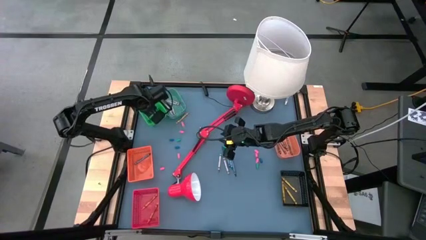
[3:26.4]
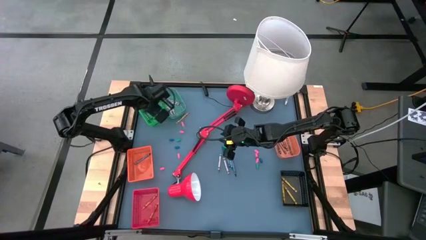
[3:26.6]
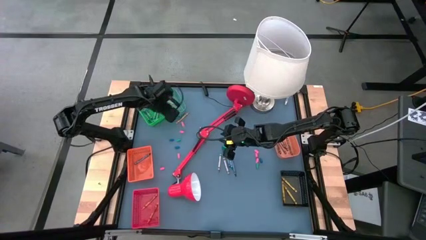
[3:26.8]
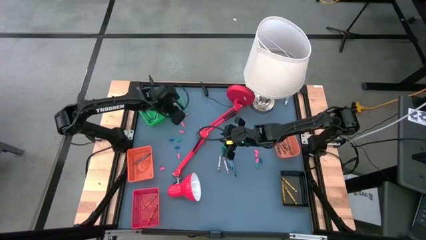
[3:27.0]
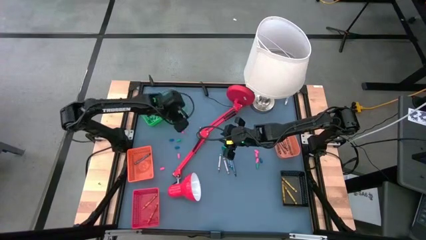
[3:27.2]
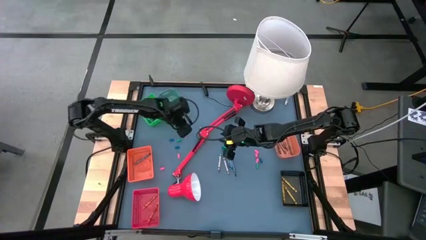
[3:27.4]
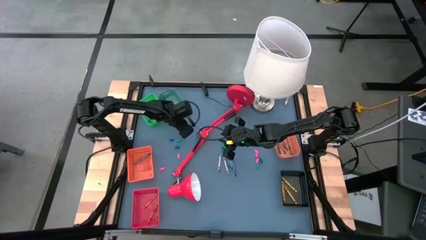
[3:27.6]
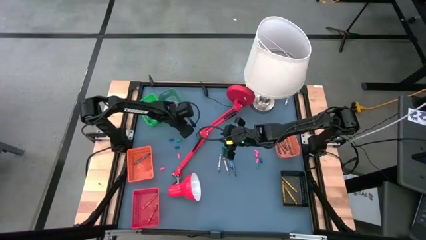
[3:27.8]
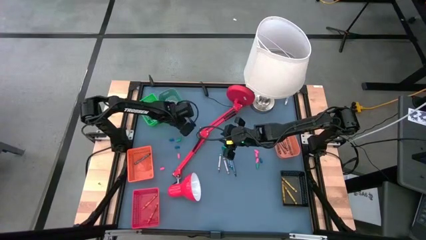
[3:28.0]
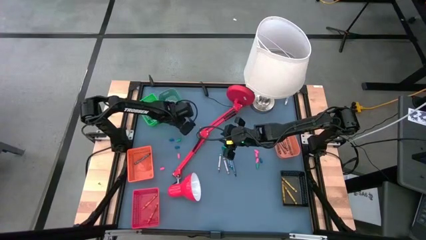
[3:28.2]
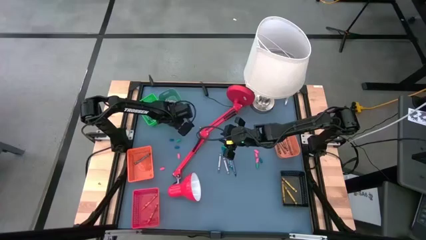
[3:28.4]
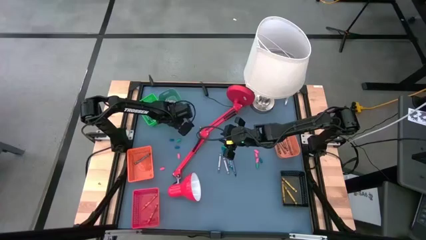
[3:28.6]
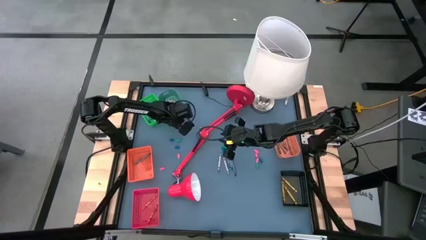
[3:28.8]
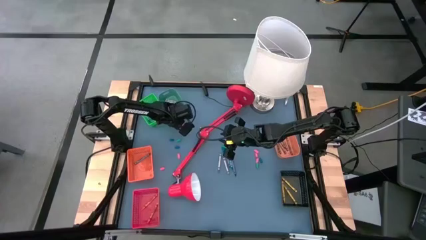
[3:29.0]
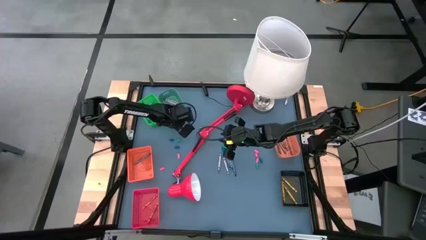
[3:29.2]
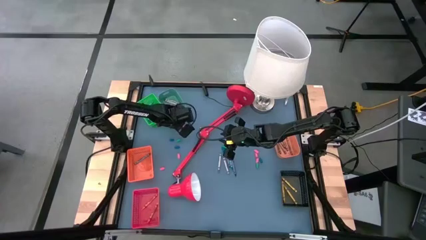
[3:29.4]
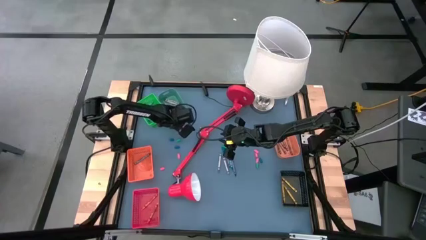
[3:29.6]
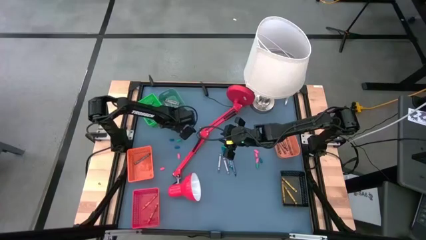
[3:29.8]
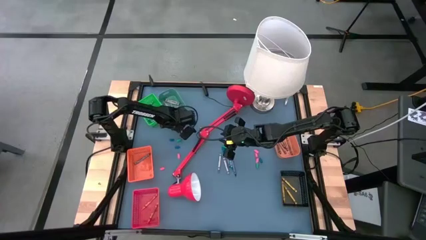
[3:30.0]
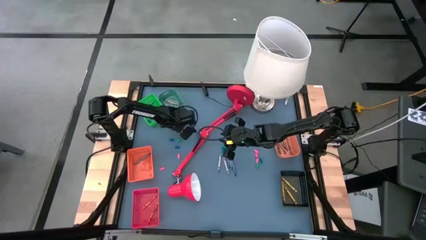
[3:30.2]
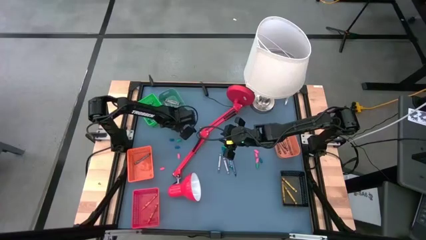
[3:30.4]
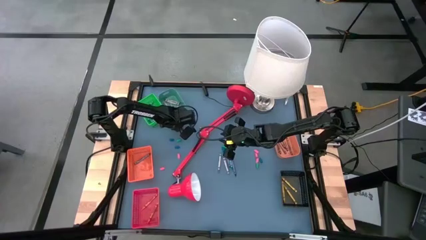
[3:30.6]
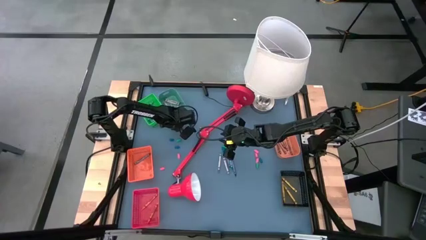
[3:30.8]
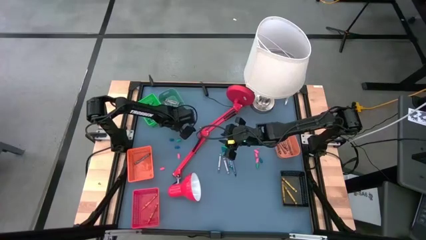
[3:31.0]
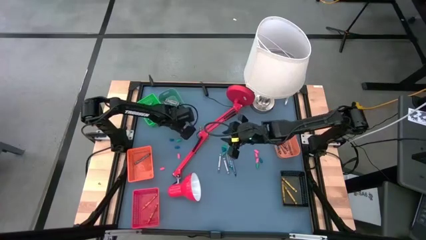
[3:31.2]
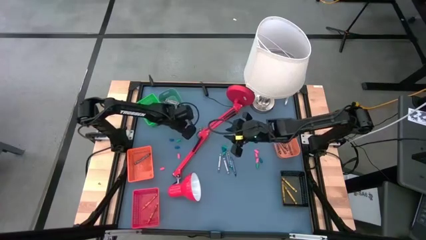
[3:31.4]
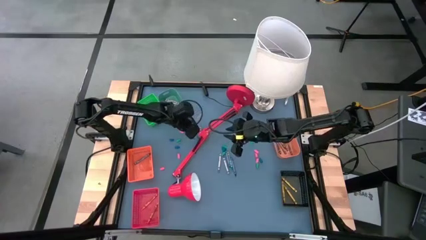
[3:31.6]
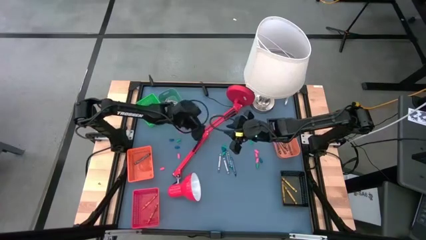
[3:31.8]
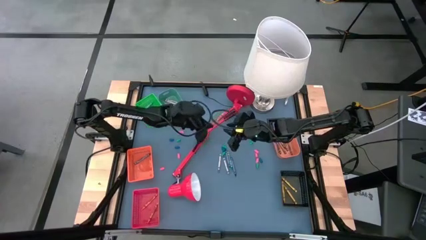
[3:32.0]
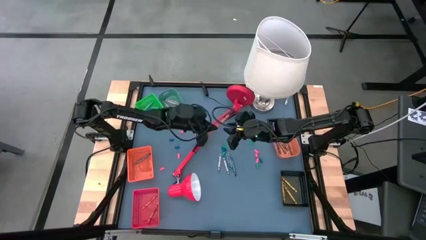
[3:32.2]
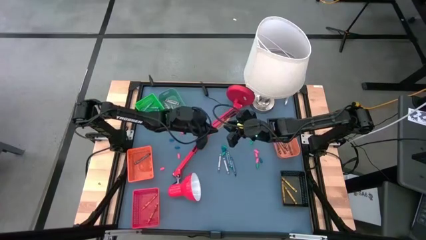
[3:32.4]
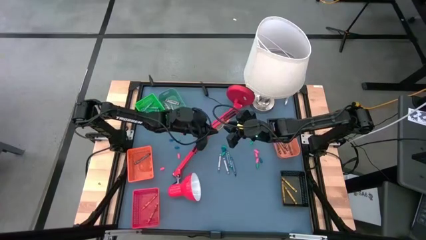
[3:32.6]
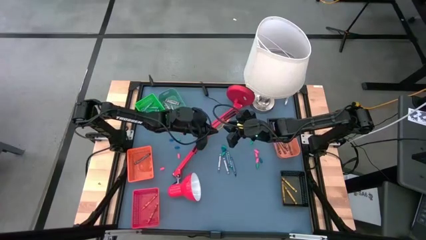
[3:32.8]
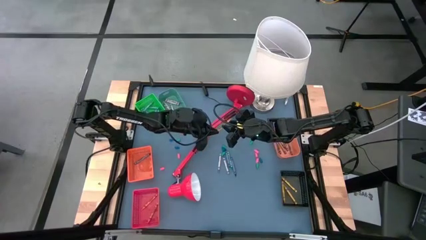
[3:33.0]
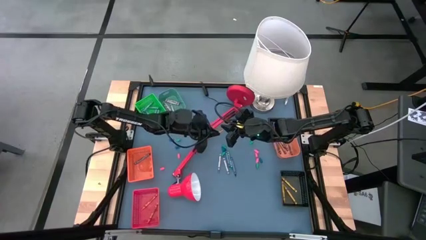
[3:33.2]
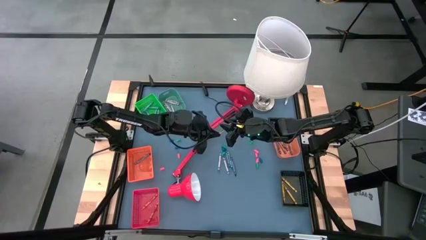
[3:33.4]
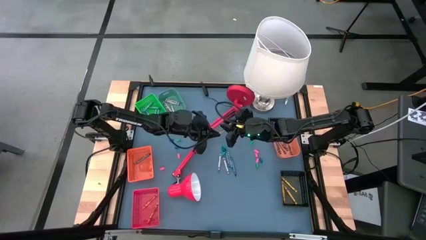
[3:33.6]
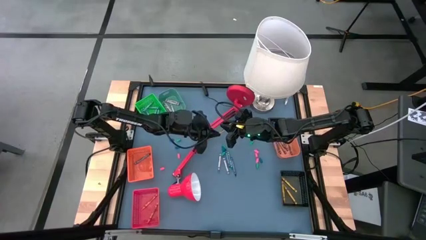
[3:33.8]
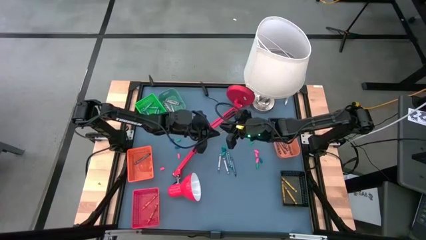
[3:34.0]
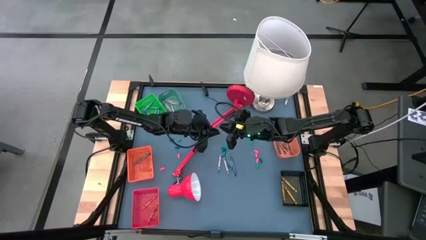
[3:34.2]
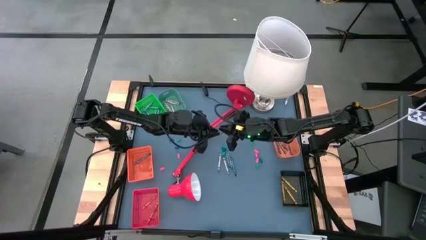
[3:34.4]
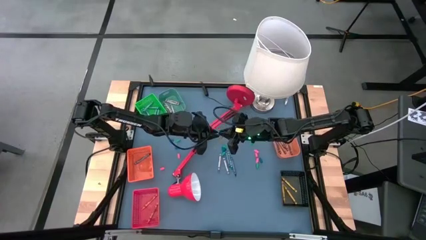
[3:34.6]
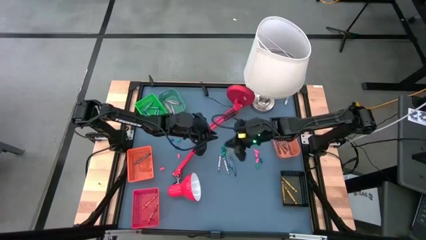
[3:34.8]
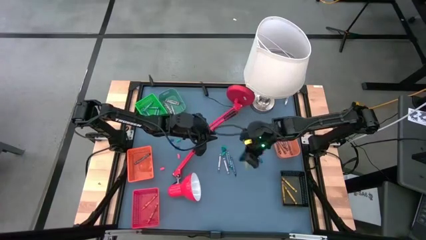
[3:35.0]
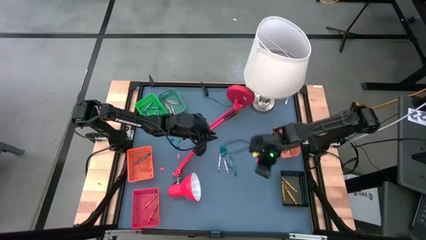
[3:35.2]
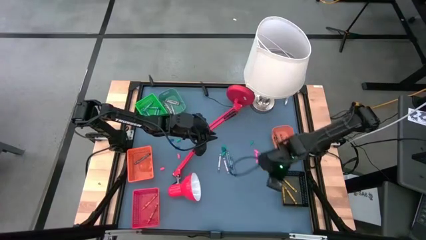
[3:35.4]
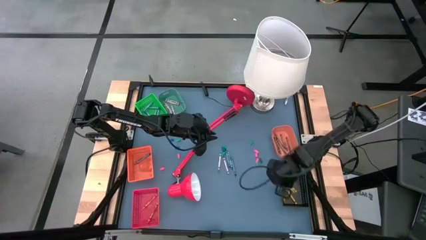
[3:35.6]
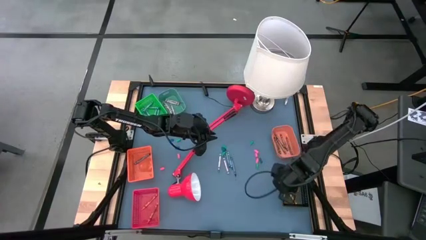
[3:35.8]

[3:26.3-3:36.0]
Task: Sort crayons
Put the left yellow crayon into the black bin

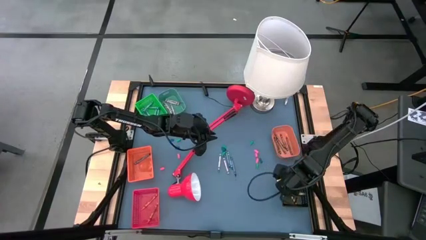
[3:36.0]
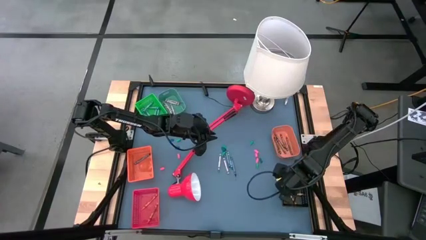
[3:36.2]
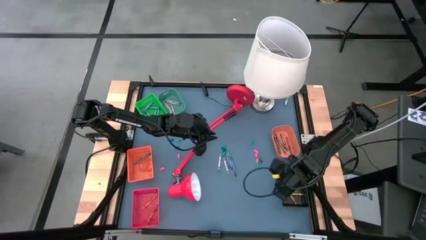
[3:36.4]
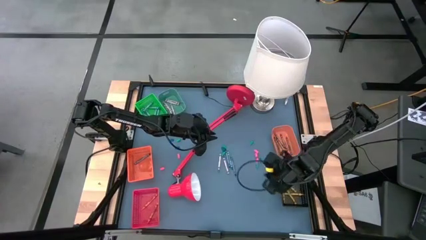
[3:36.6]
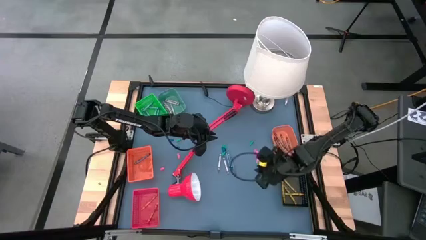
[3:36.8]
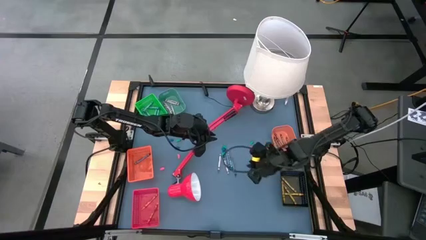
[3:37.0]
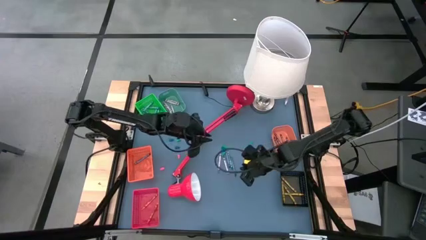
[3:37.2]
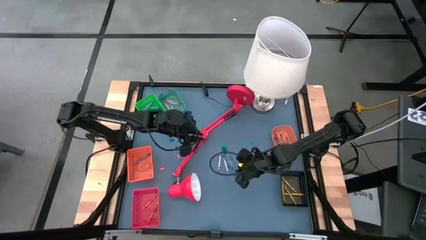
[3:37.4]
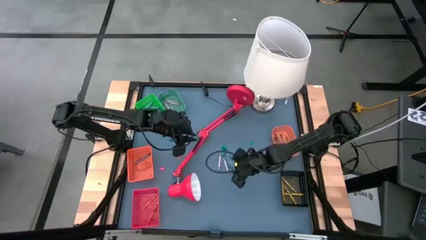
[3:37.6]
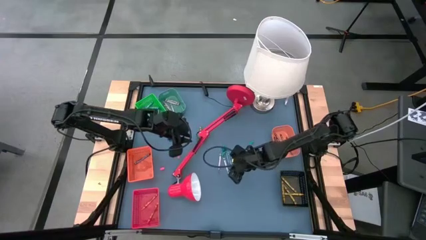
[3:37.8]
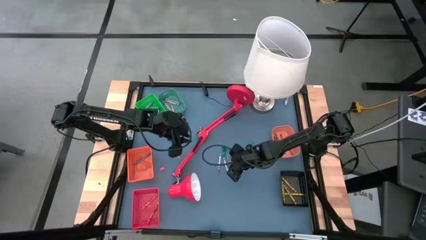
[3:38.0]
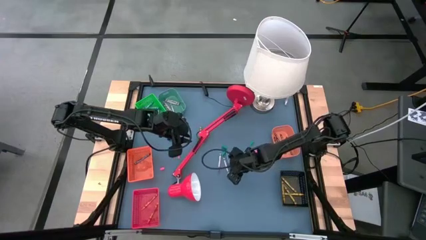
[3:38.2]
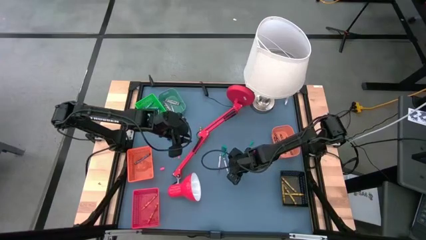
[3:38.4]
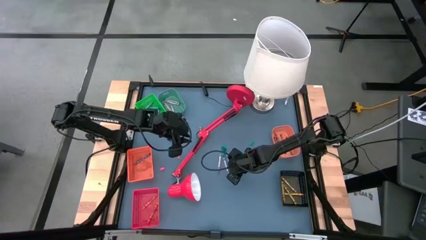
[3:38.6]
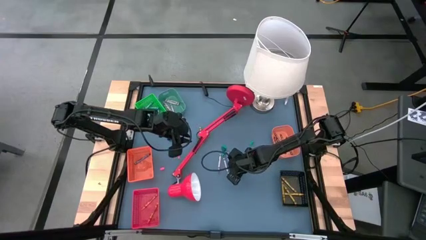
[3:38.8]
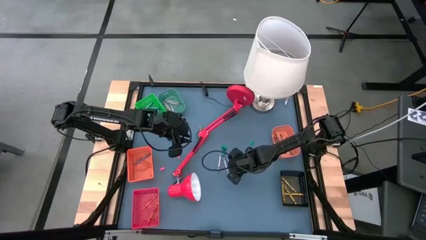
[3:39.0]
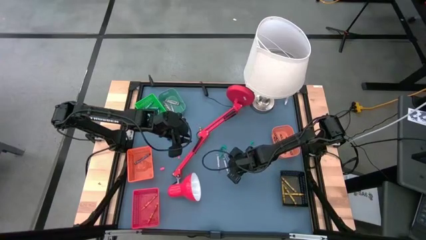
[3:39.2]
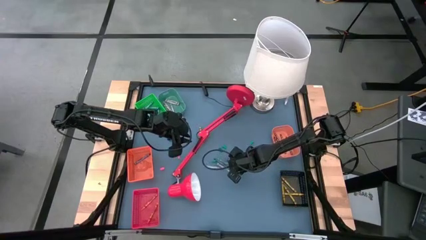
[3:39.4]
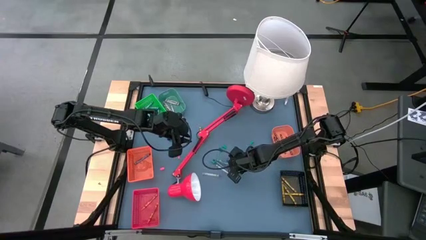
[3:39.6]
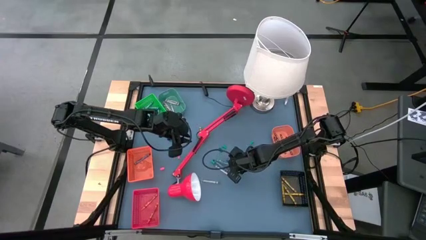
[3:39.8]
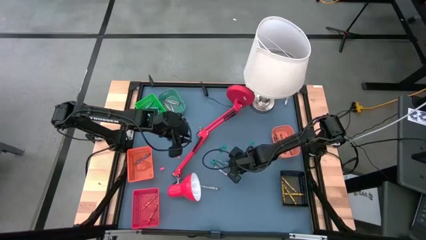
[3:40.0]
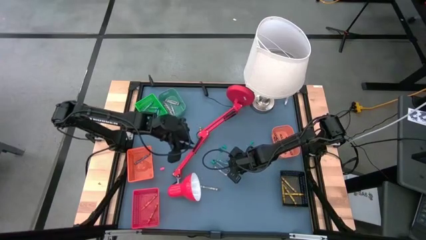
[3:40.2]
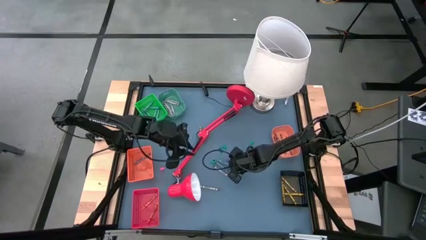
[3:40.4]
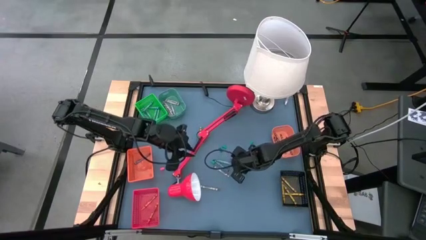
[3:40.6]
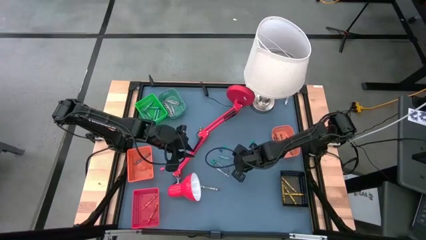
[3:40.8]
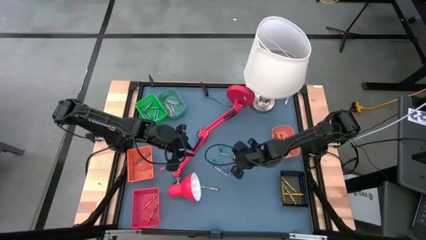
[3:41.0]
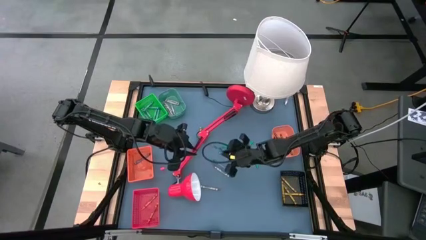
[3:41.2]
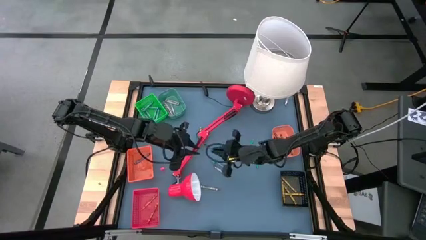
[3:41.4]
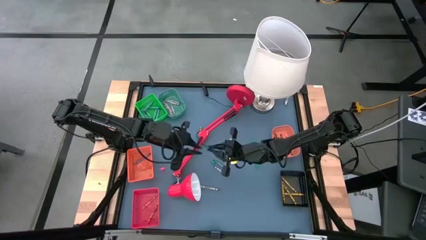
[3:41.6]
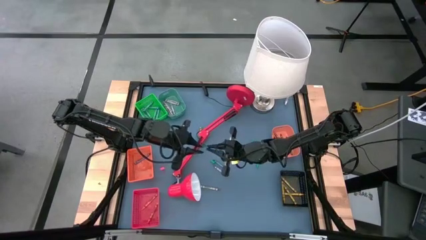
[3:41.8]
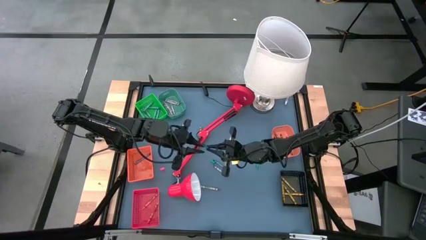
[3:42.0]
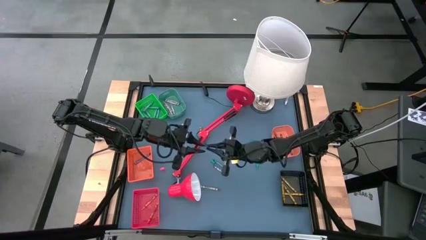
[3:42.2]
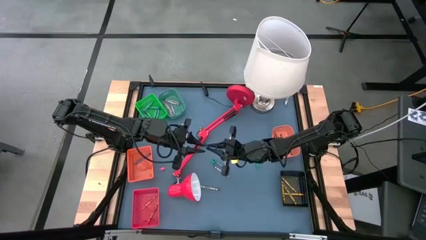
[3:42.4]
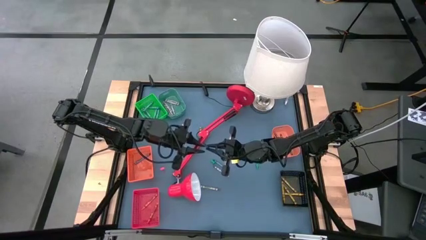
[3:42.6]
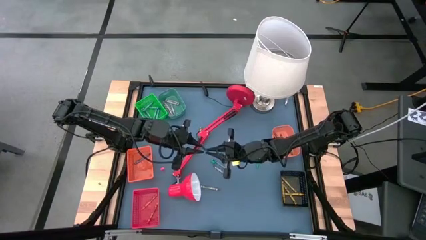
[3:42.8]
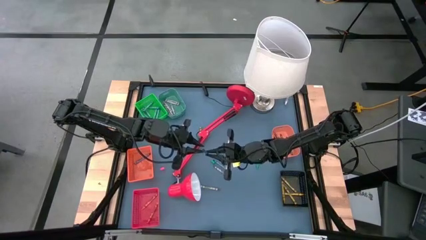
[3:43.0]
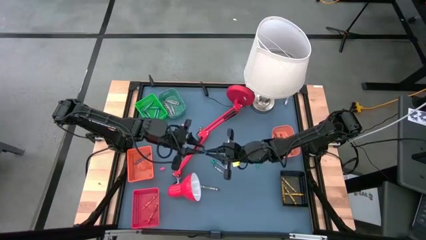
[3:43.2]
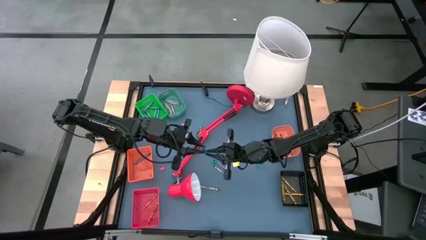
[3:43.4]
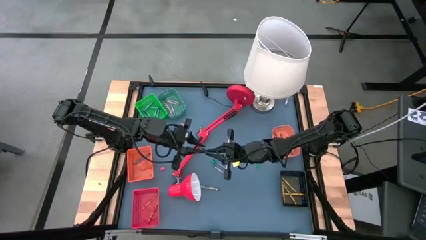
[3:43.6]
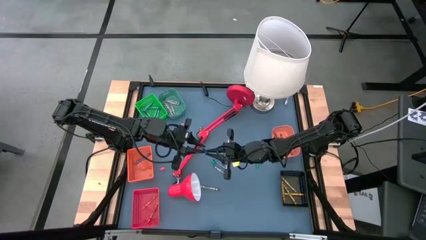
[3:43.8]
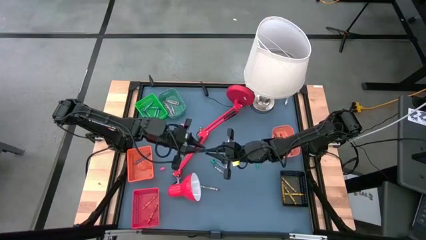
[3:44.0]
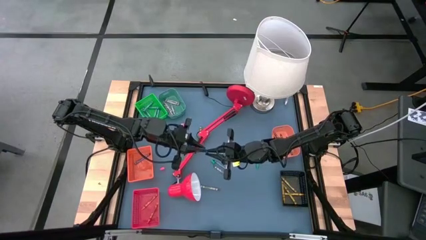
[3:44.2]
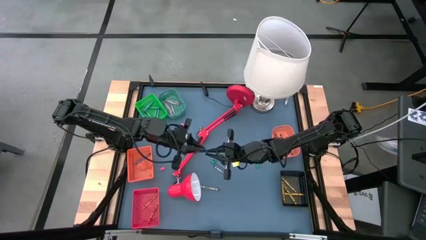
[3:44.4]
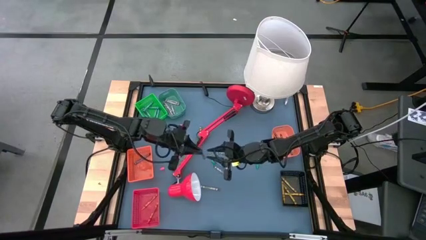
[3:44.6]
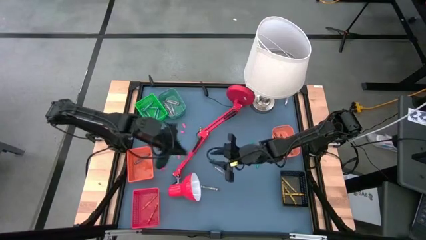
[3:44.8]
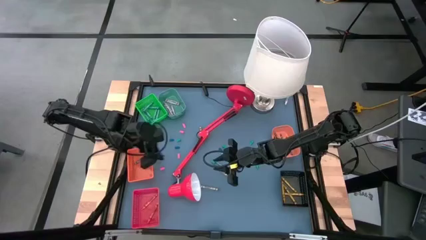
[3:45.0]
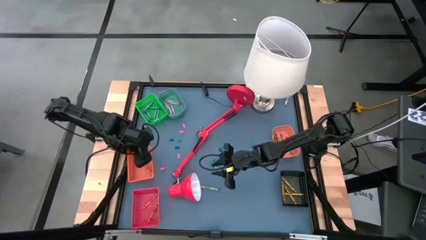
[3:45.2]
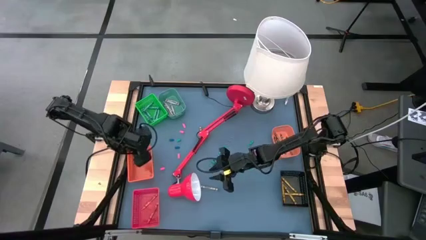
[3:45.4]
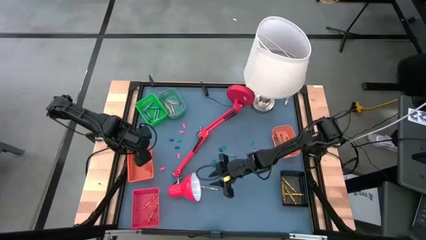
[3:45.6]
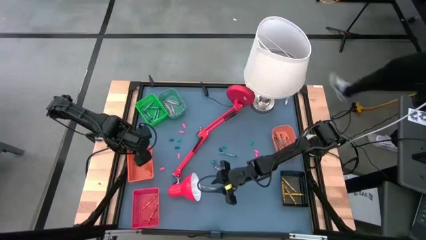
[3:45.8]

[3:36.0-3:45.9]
Put the right dark blue crayon into the left orange bin
